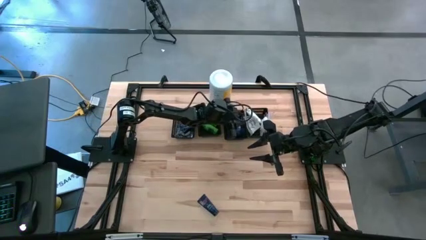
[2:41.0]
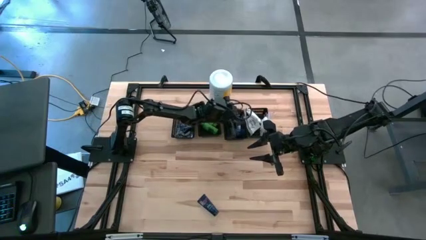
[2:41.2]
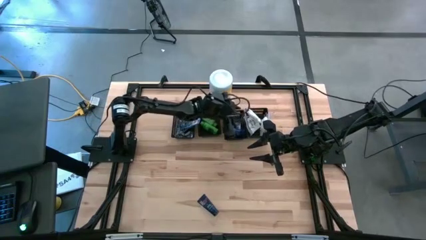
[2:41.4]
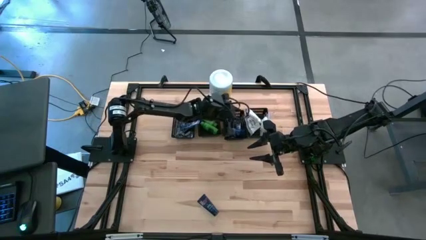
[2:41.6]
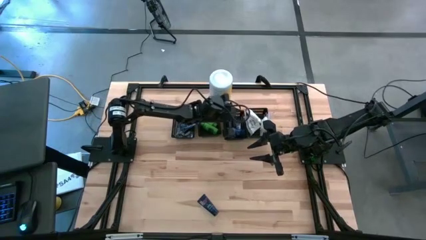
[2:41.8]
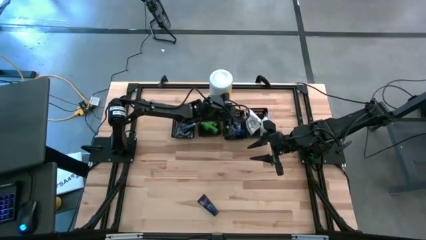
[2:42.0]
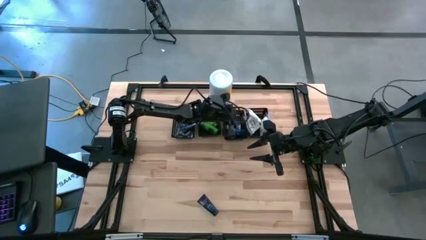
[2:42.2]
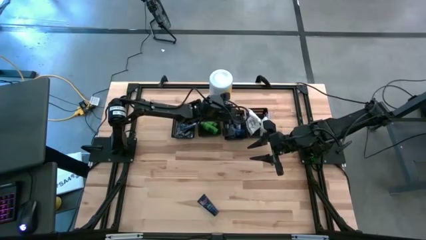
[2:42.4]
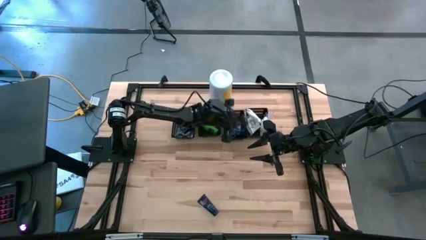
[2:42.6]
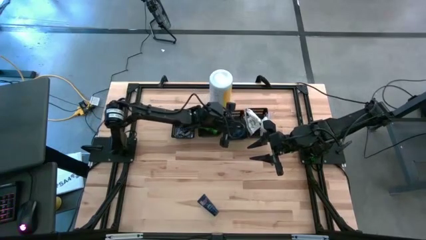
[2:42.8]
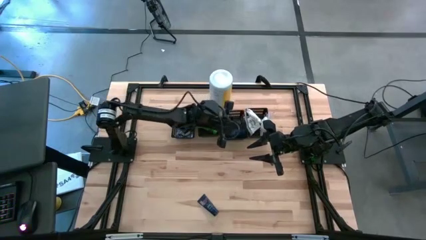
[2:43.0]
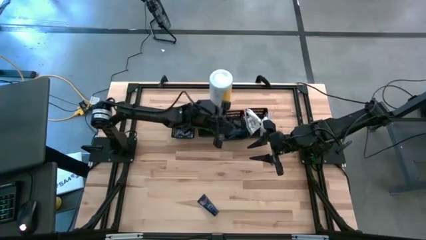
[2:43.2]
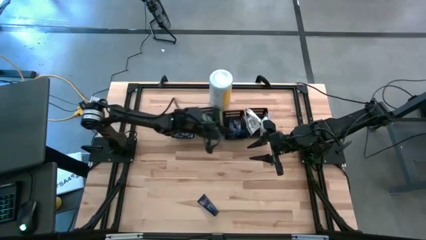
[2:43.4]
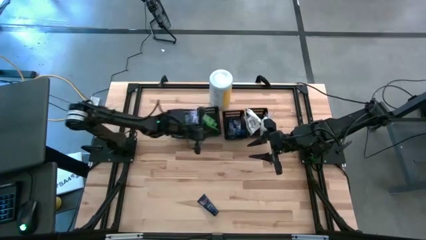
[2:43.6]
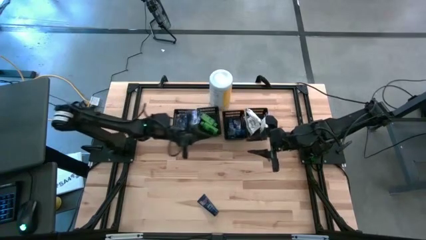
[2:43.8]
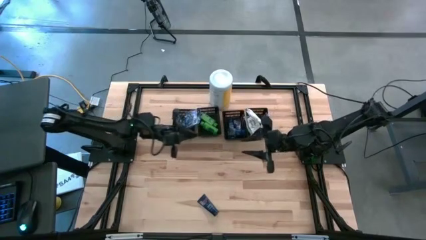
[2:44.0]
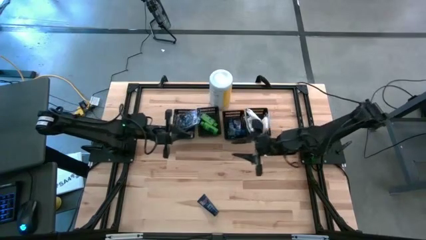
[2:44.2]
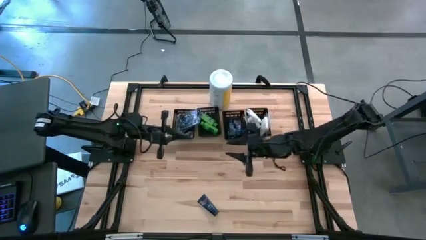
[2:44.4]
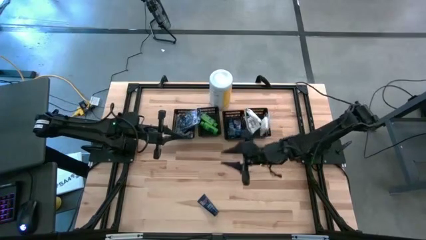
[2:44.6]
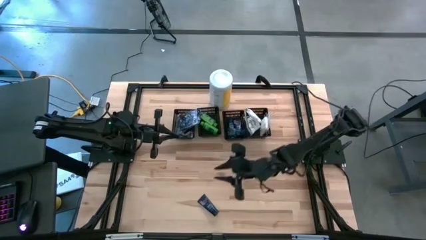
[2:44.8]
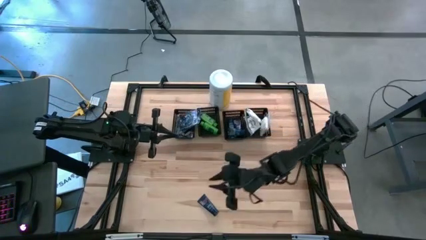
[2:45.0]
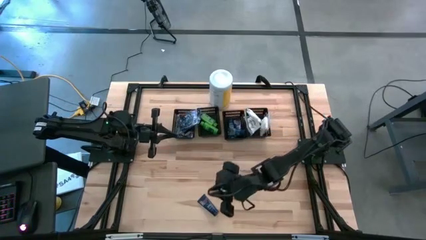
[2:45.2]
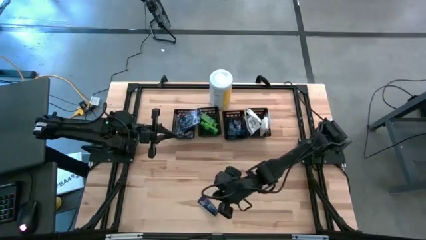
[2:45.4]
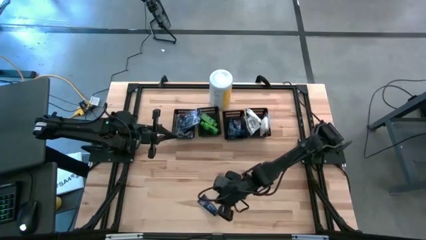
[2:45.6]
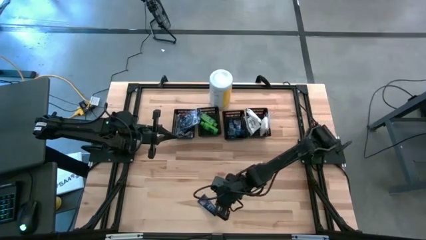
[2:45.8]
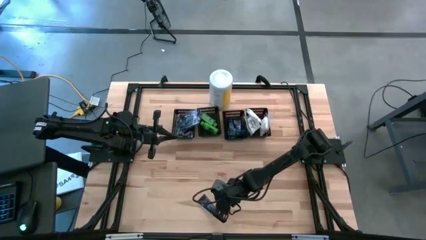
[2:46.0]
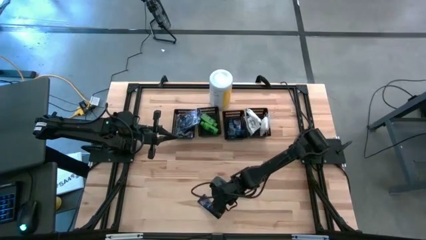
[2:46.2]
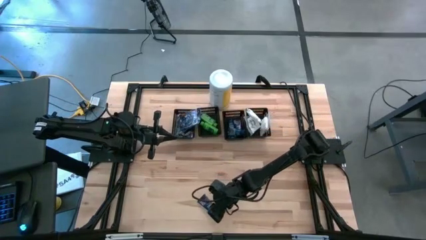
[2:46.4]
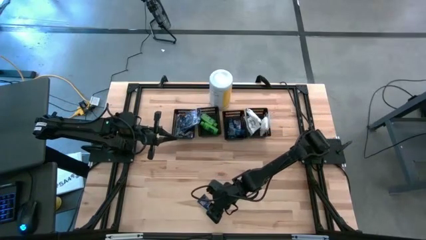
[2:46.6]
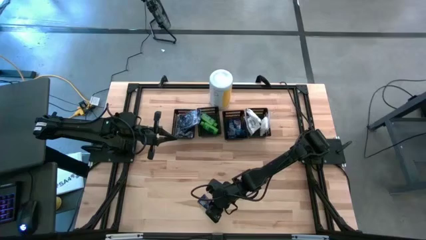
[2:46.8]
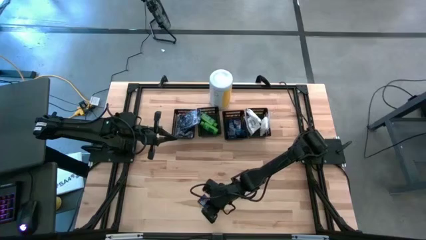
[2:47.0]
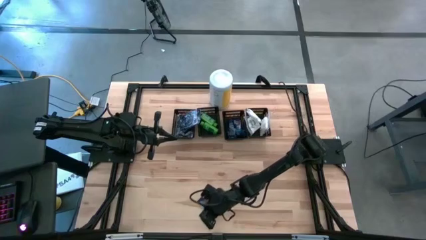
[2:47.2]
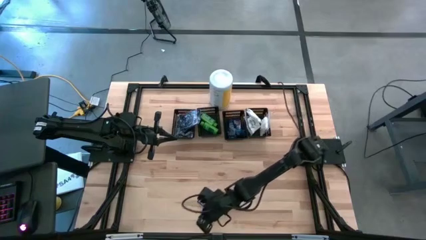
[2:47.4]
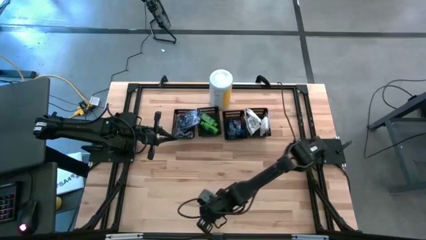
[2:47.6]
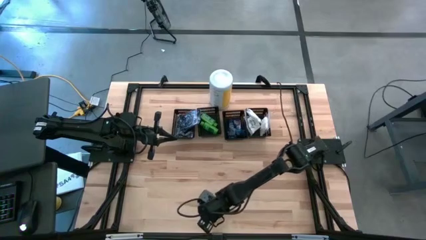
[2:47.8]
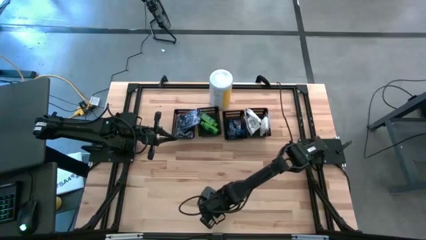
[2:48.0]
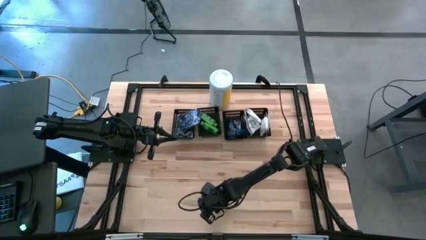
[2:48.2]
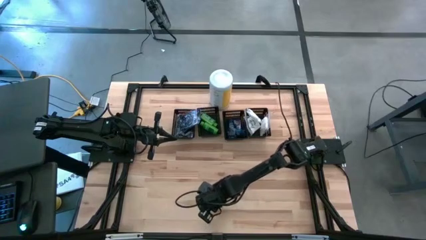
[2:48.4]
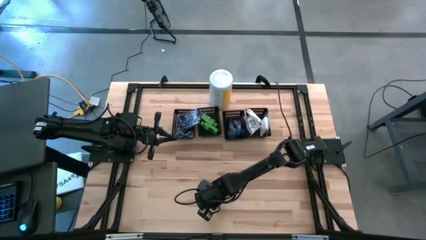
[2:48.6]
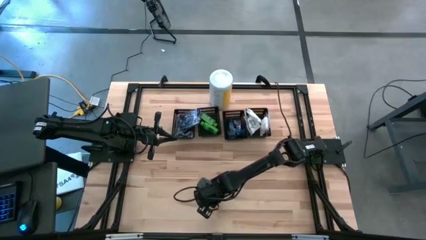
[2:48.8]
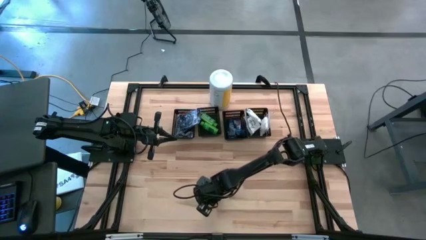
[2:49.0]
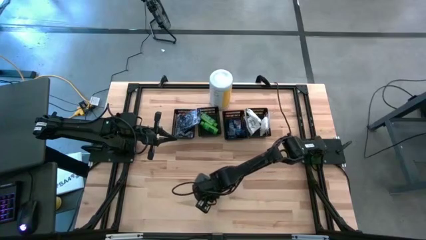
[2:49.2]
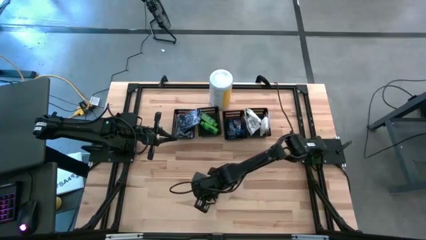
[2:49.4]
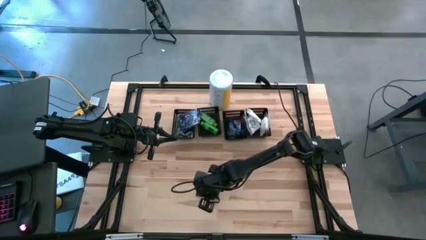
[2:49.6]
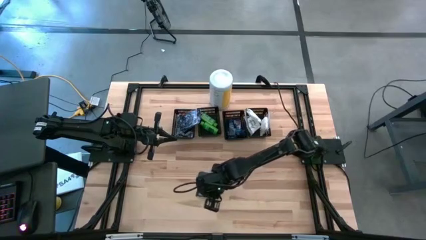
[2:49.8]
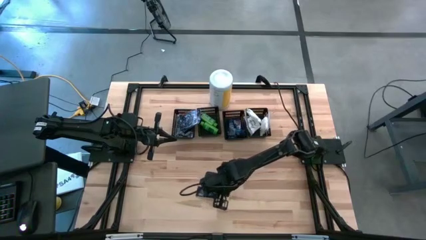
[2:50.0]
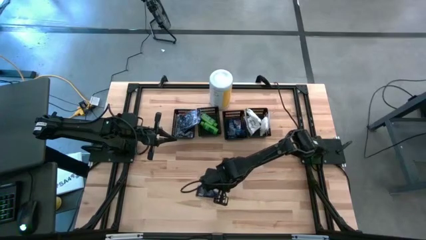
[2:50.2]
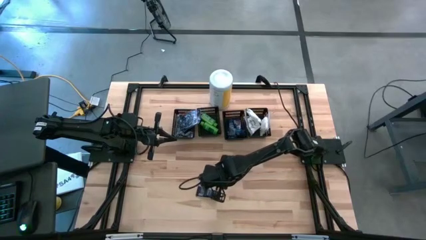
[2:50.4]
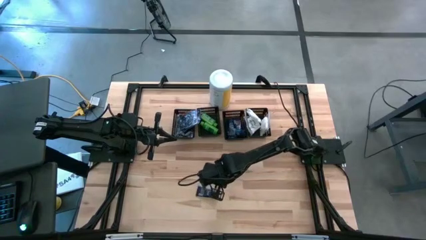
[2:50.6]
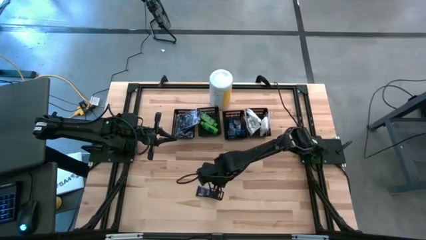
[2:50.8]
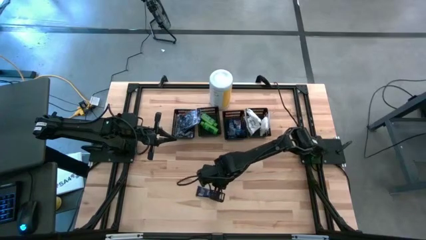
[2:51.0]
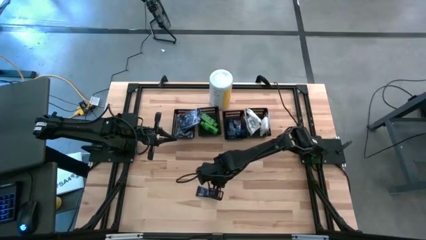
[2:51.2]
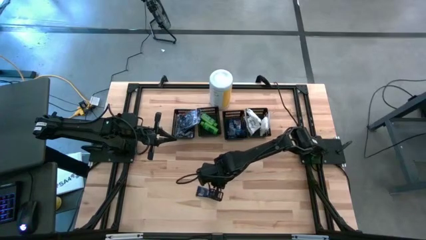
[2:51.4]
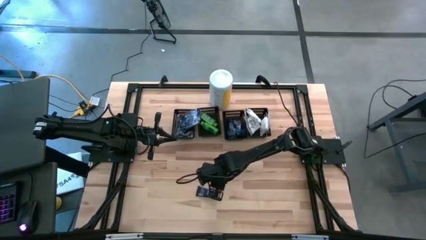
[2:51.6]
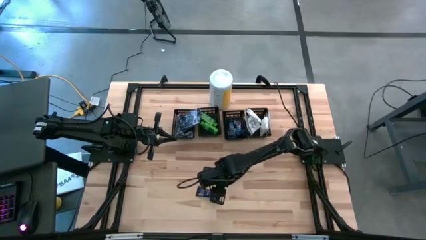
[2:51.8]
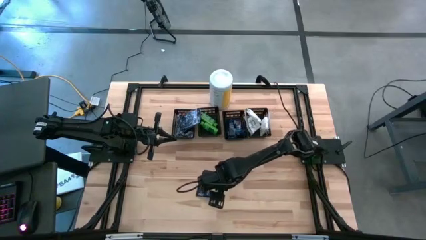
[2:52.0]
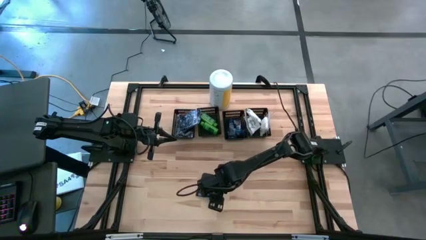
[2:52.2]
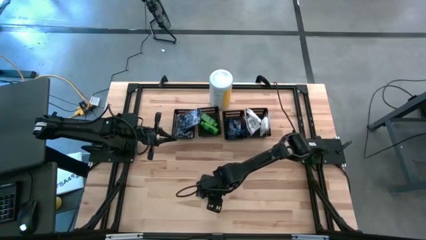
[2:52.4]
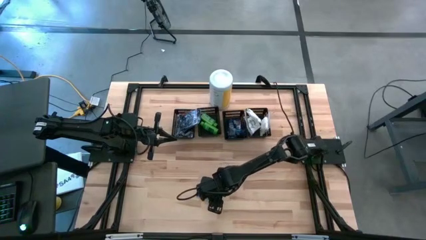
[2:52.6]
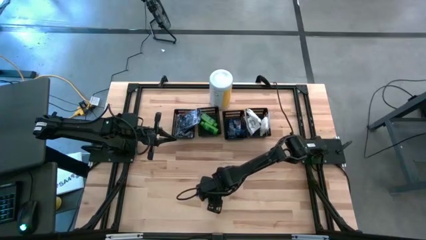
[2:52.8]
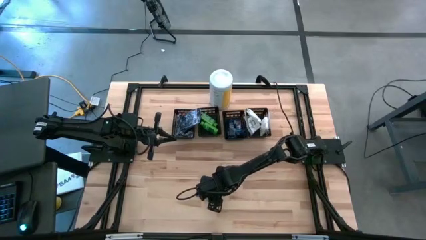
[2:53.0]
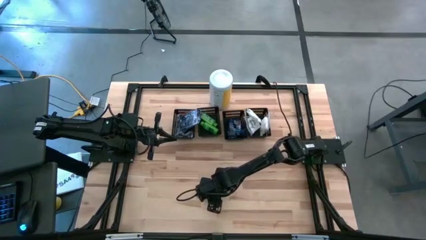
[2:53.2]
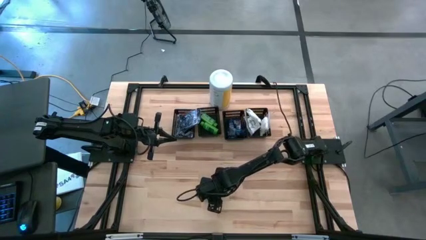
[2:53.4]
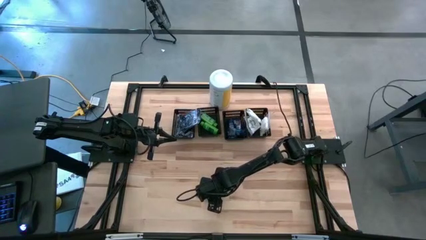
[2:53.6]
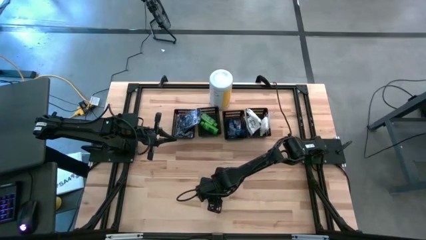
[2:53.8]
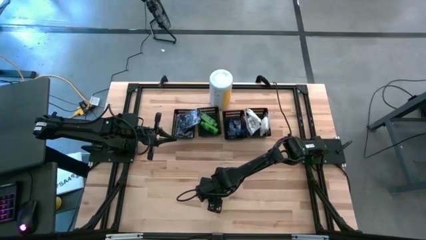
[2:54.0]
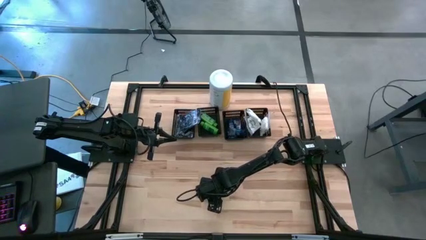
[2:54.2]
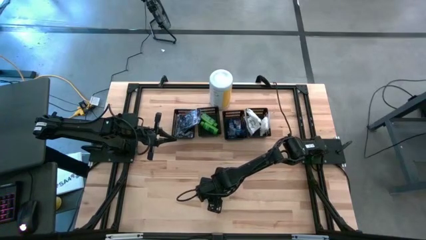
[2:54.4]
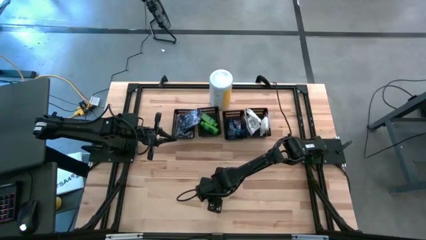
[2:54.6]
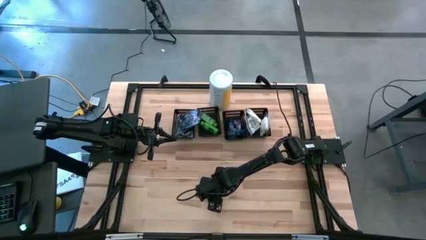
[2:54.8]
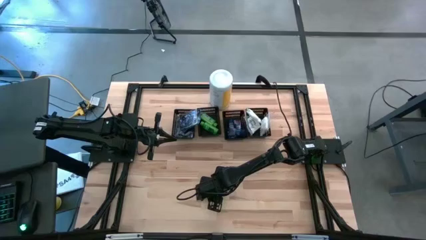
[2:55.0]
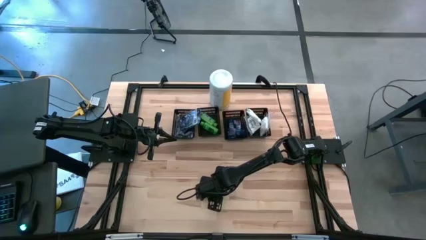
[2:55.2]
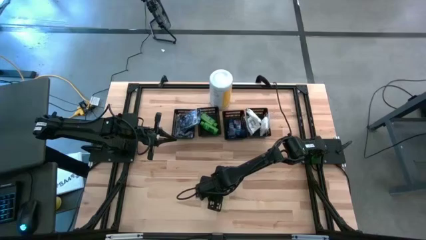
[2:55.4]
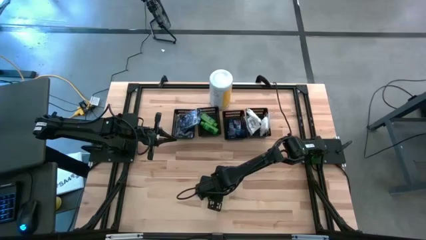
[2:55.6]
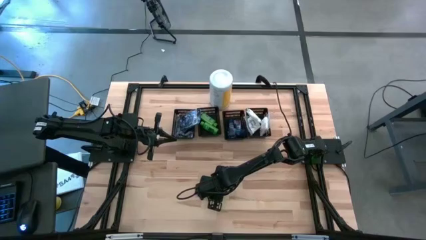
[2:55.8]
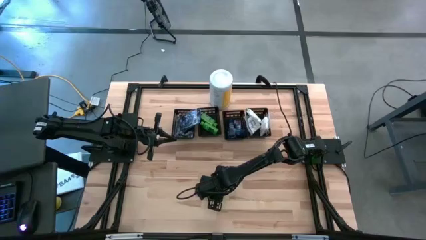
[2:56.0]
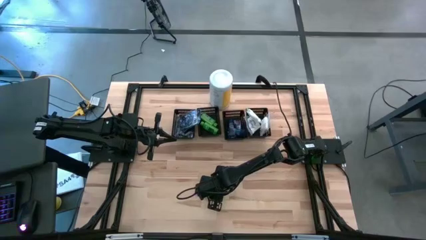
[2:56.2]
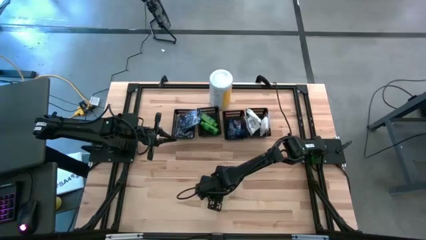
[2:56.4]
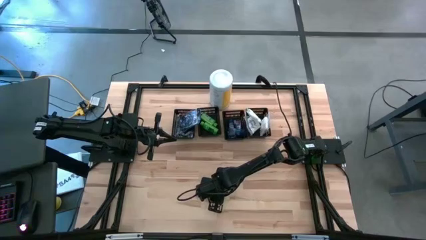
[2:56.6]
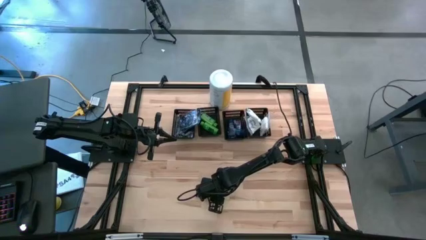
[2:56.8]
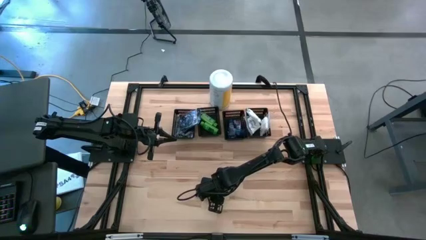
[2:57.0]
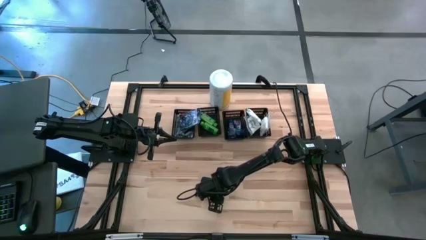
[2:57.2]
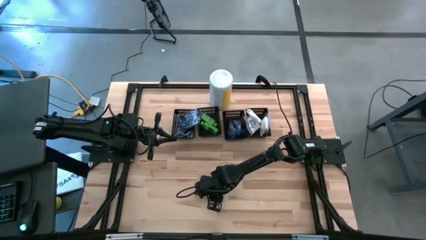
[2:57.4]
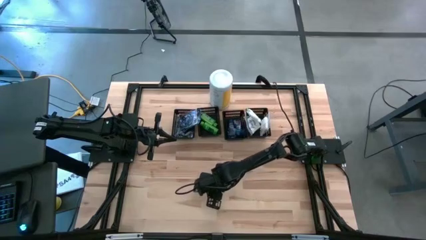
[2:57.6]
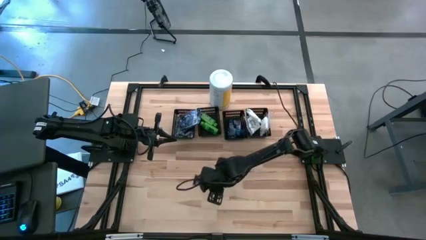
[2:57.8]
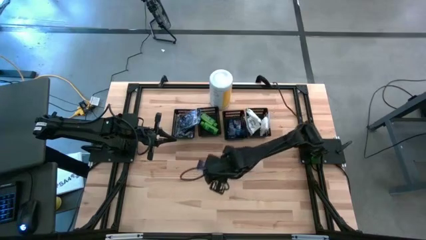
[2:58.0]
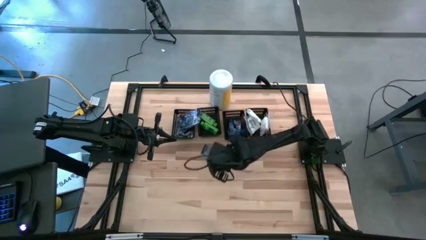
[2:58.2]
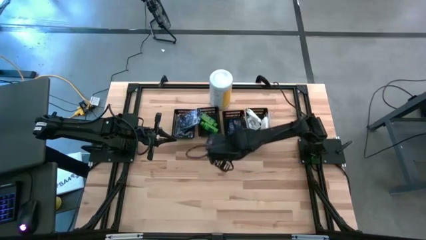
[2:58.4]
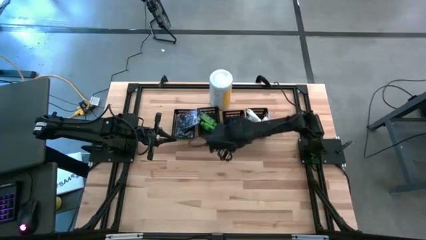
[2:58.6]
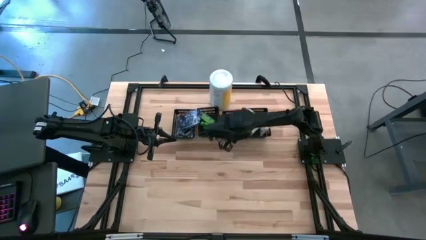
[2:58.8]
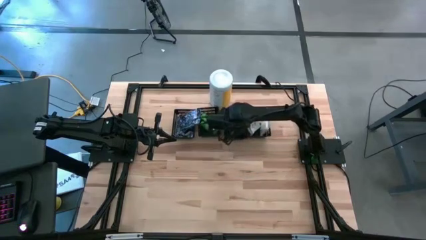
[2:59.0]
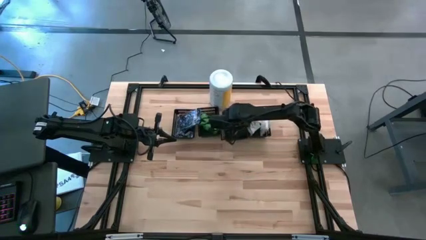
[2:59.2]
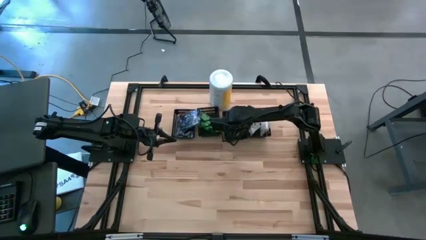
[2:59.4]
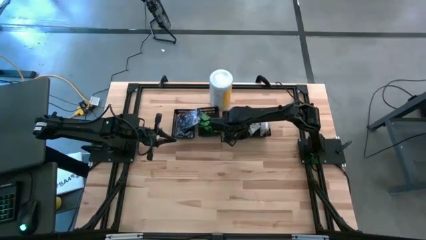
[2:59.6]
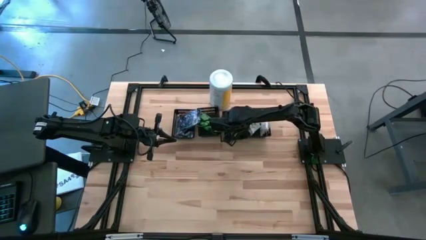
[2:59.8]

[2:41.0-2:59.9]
Task: Pick & Place Travel size toiletries
Put the shave cream into the middle right black bin
